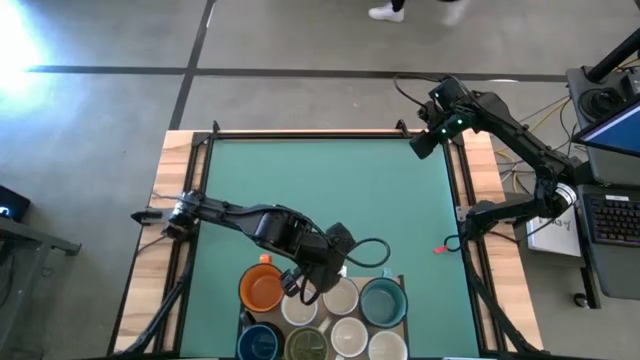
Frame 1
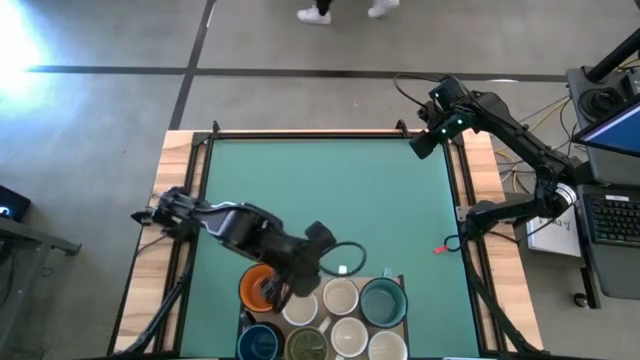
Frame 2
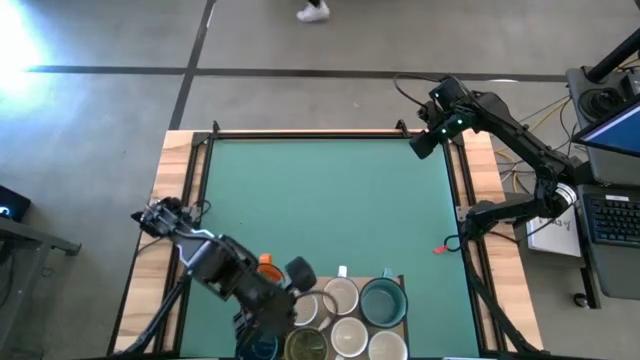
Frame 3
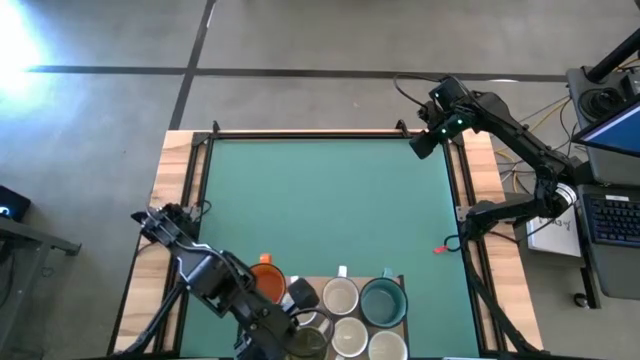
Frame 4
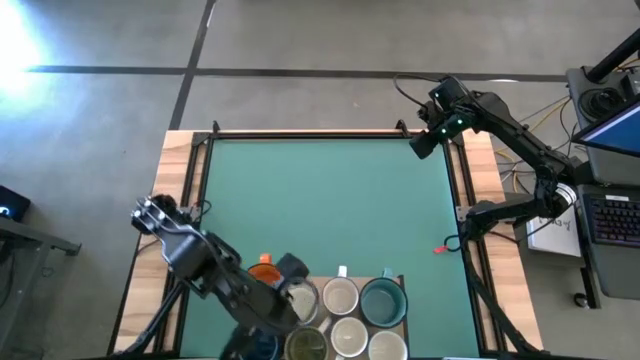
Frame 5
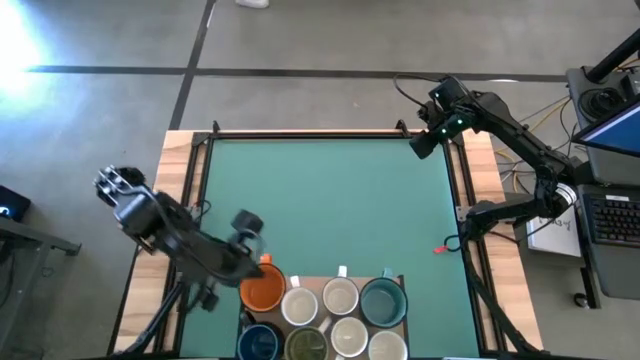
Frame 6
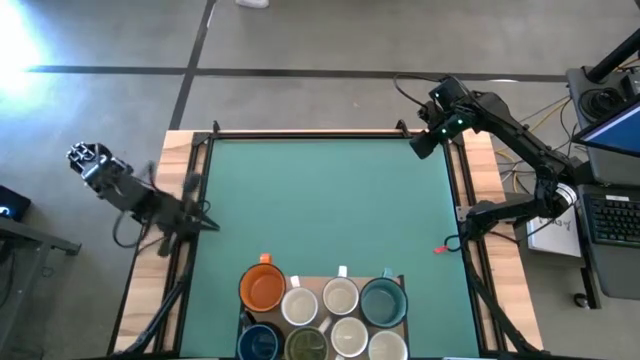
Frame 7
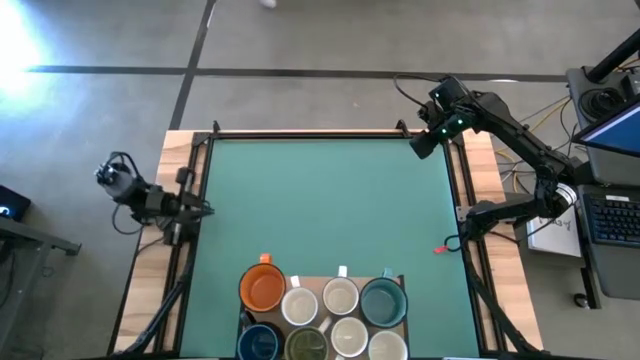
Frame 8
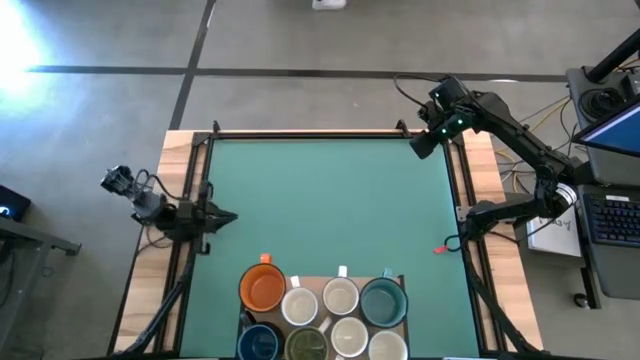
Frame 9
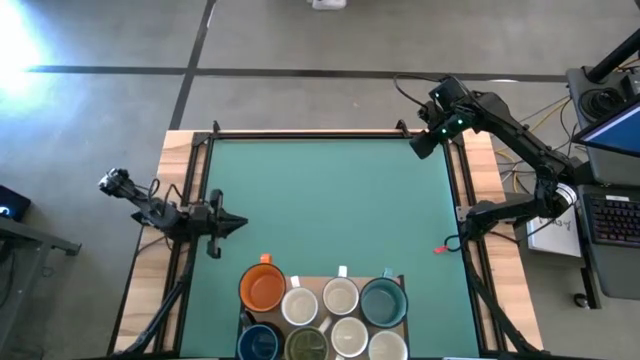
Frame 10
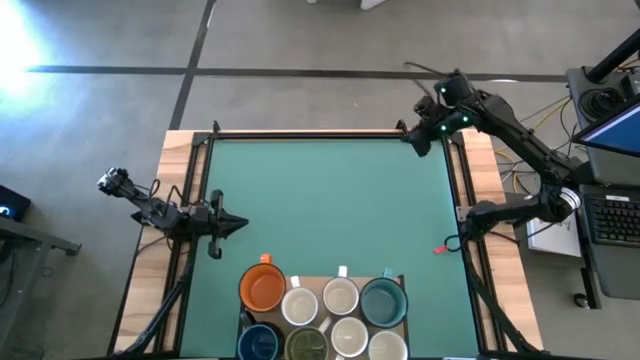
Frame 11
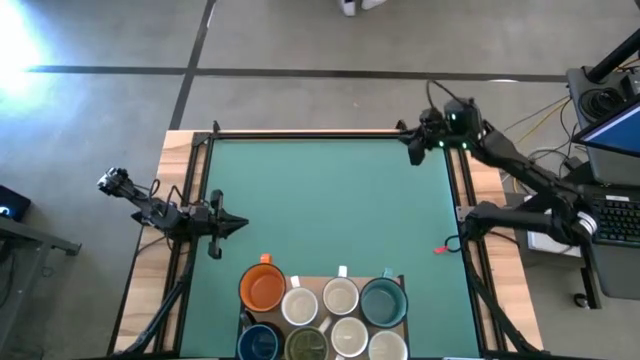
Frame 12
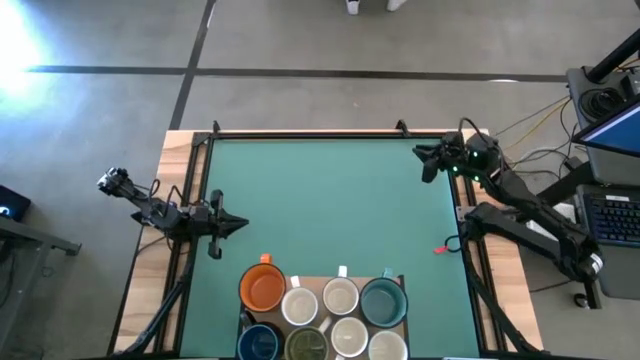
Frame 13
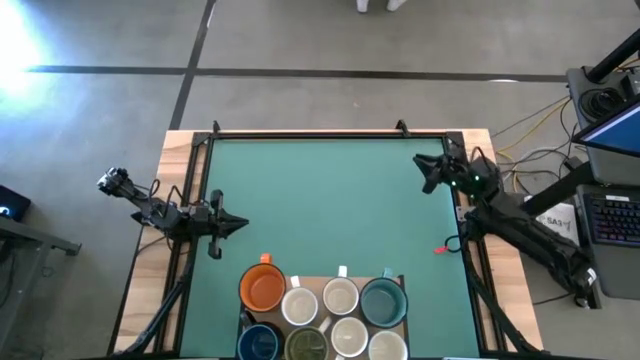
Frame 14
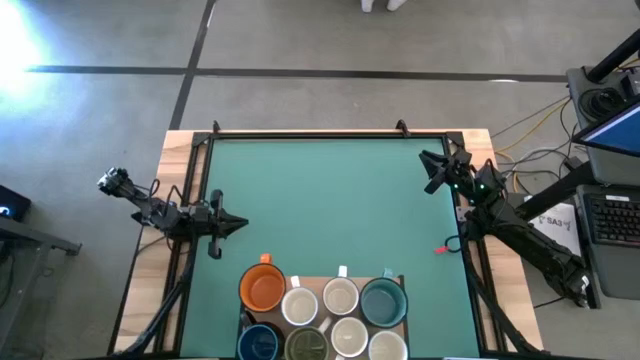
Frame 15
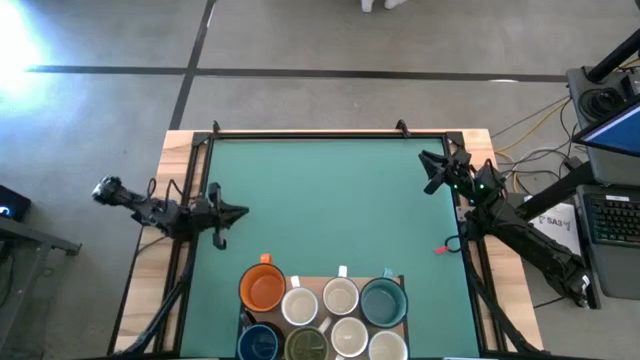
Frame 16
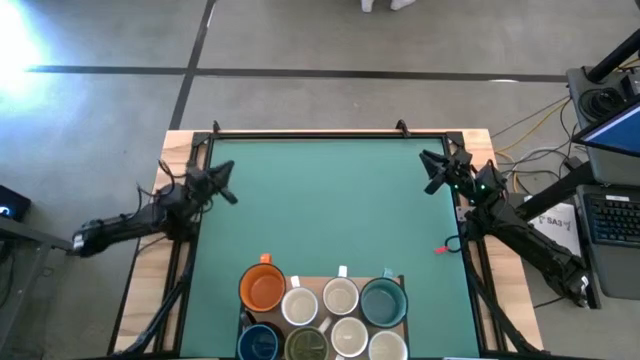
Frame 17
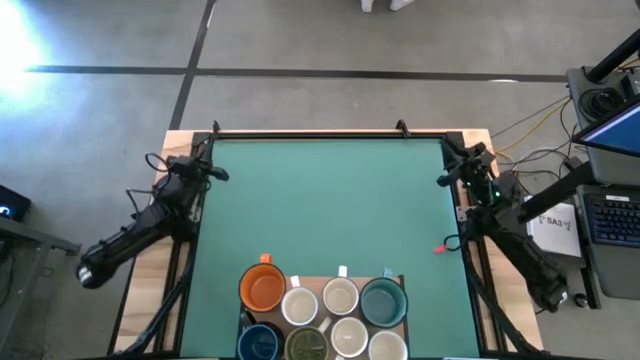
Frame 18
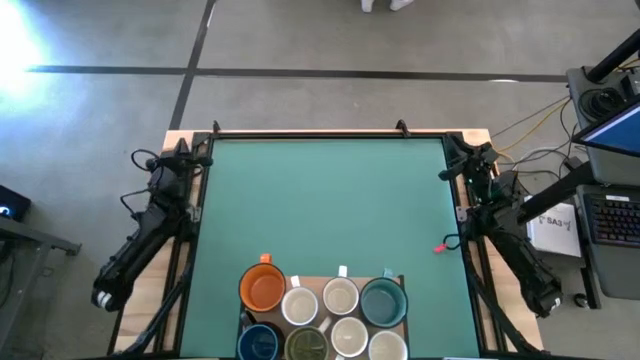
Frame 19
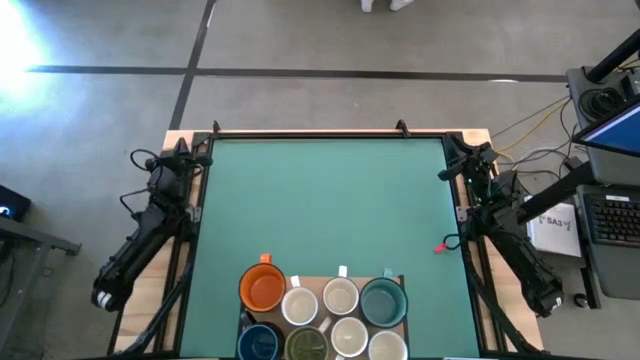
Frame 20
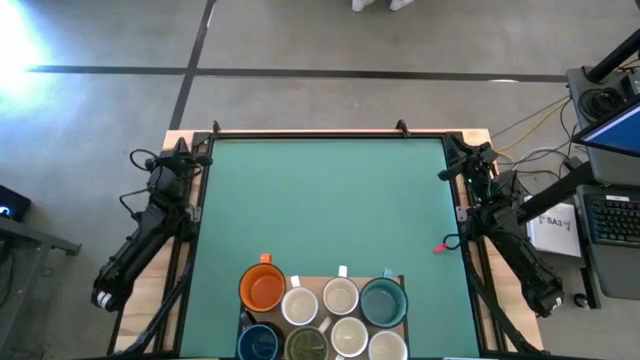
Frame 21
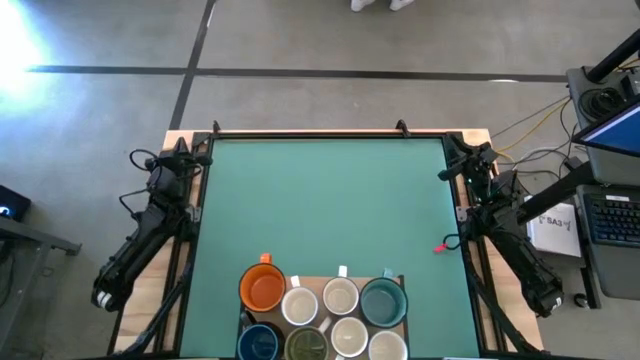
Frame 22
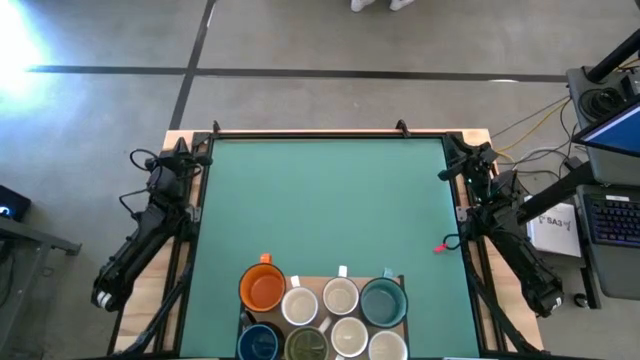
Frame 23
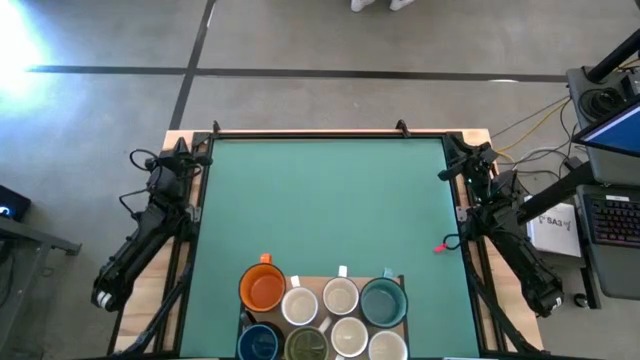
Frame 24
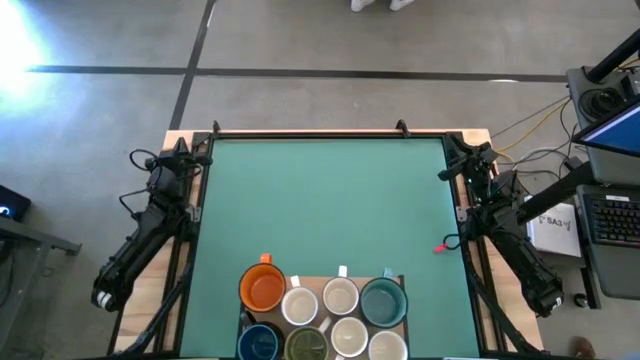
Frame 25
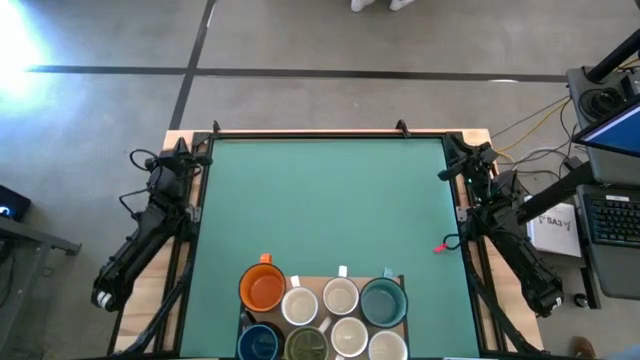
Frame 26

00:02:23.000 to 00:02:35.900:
Task: Place coffee mugs
Return to Home Position

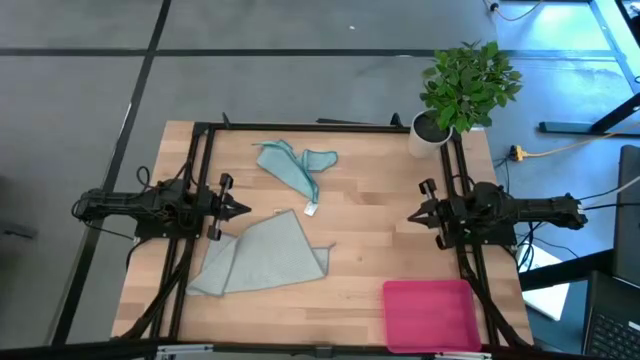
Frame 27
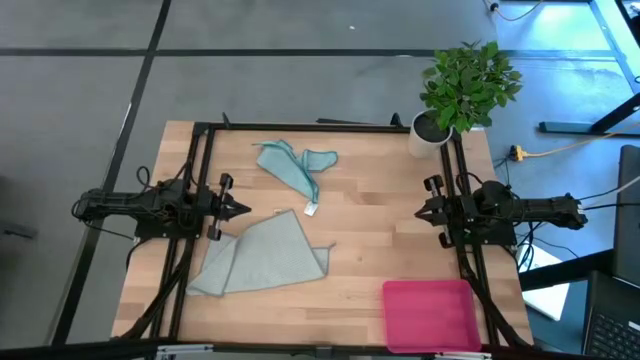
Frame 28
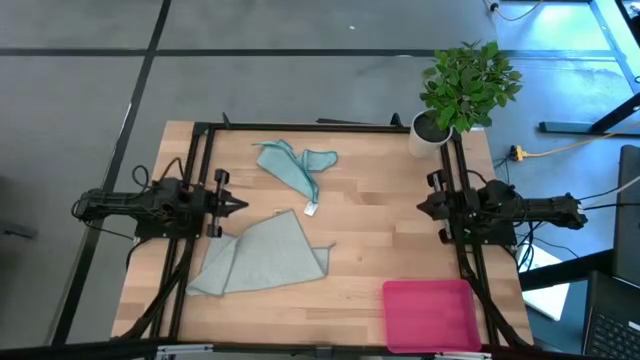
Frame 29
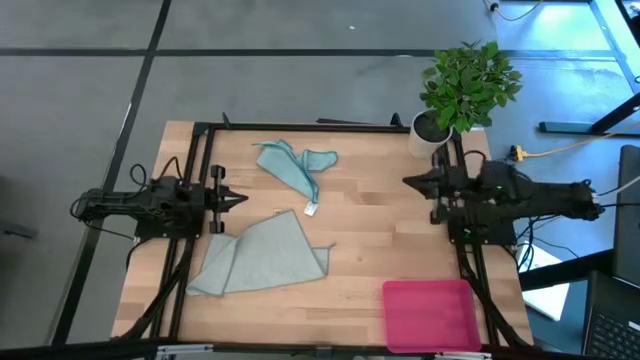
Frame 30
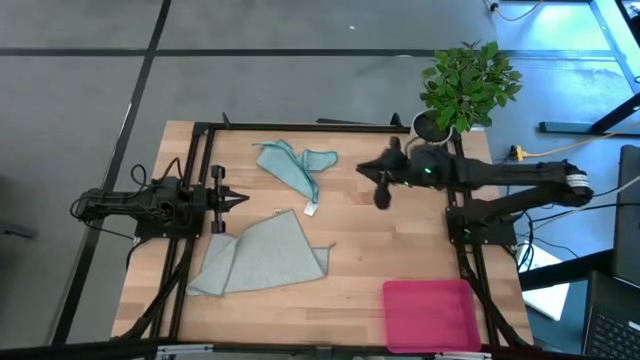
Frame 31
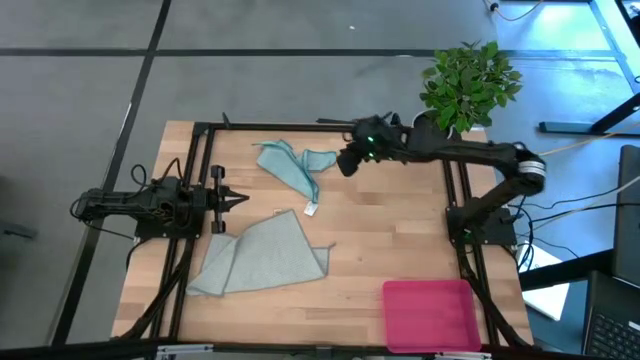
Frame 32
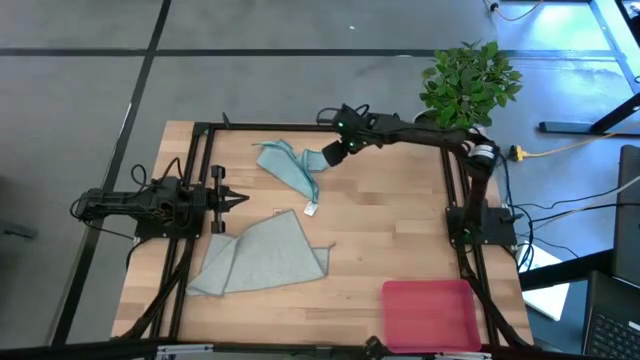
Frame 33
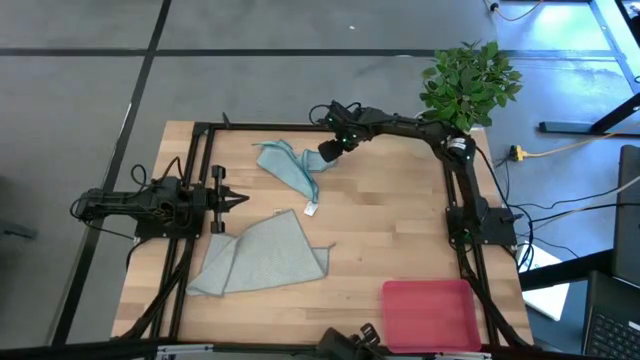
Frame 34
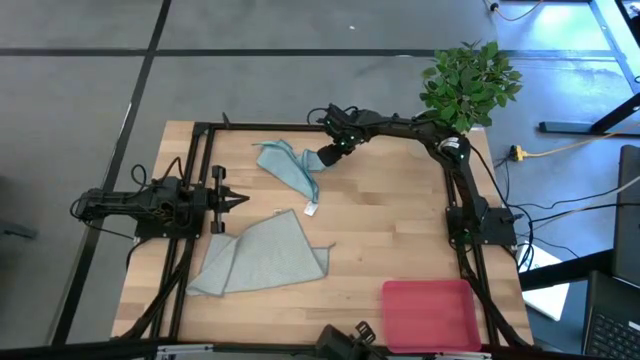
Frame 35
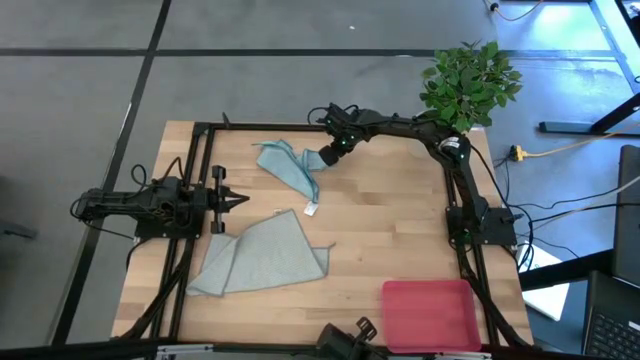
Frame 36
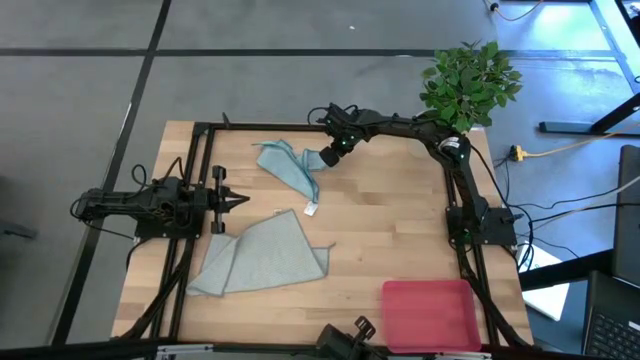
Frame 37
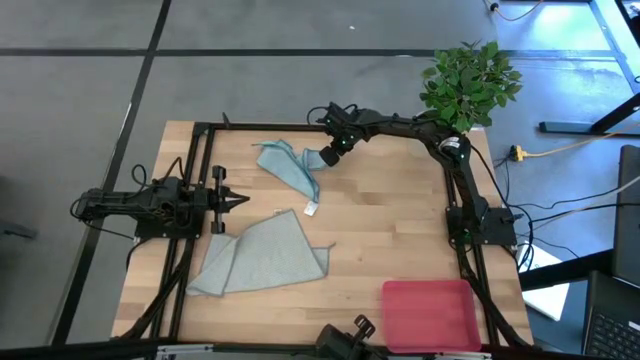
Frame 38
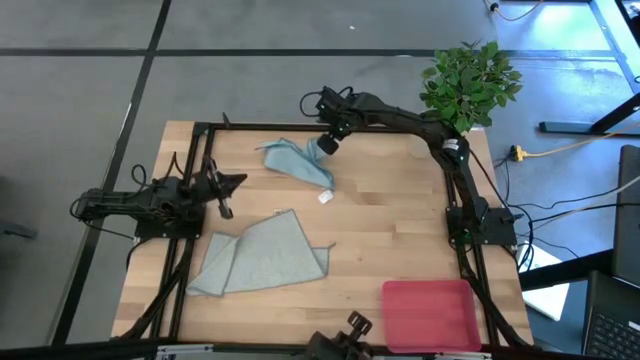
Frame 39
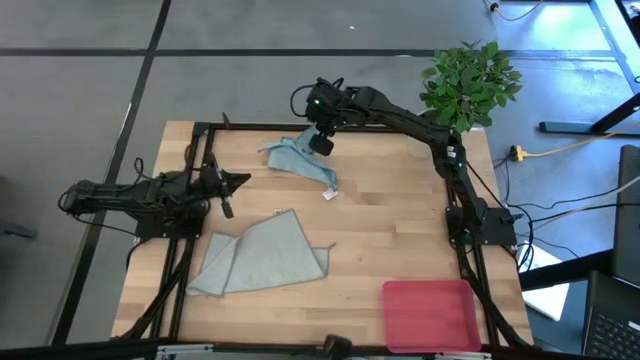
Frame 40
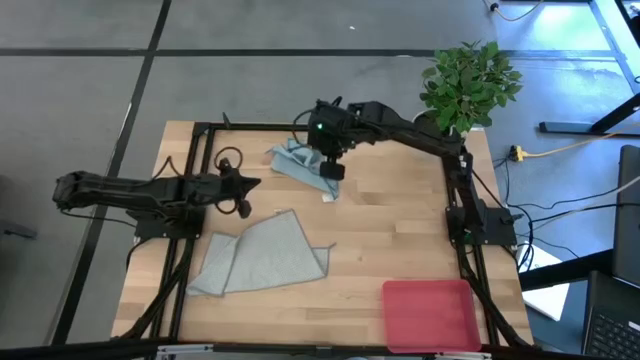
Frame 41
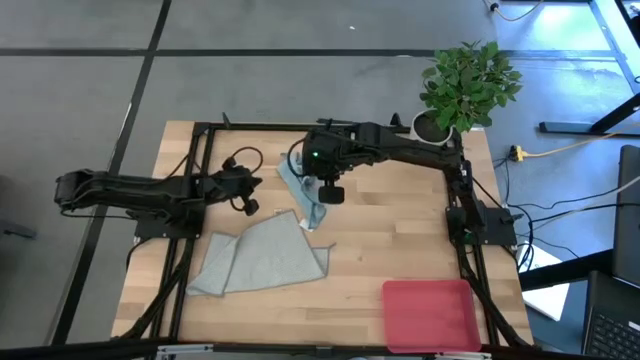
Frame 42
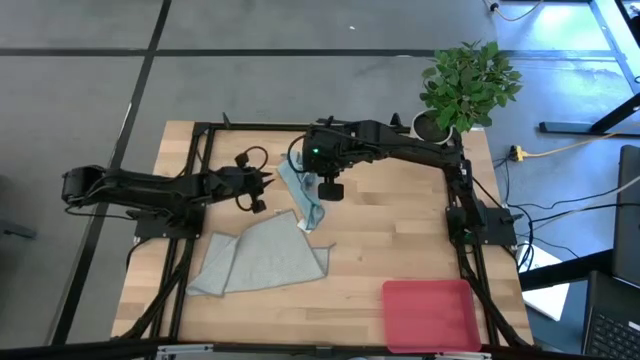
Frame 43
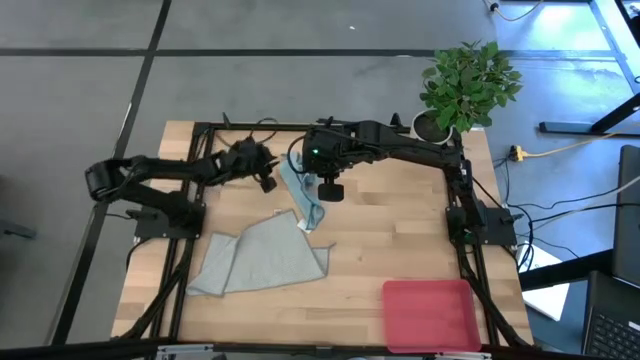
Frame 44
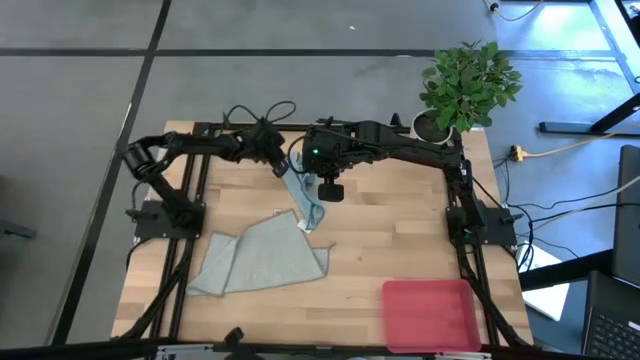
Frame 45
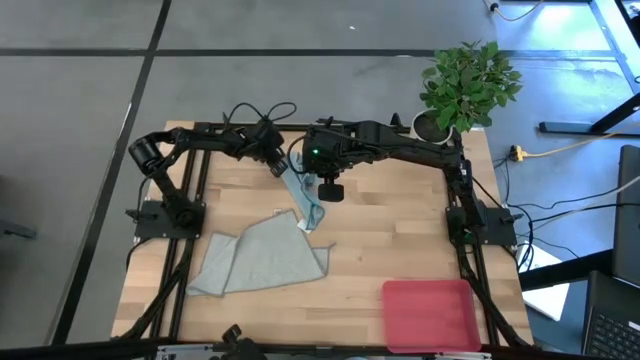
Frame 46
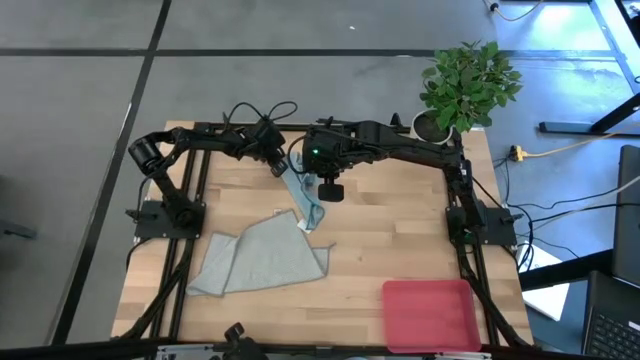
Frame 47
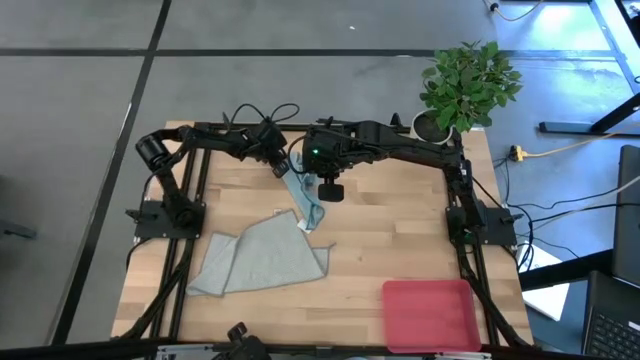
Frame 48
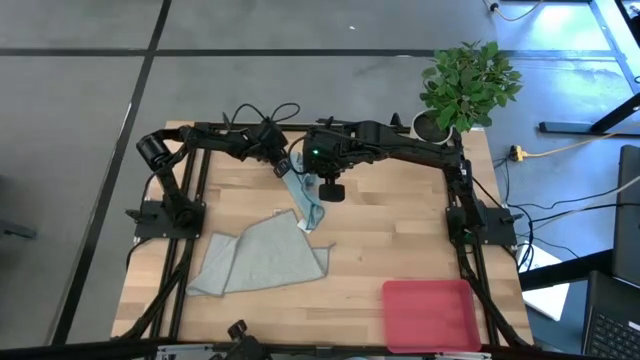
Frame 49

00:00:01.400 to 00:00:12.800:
Task: Roll microfiber towels into tight, uniform cylinder then place into a basket
Fold the blue towel
